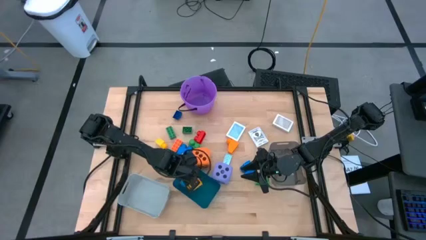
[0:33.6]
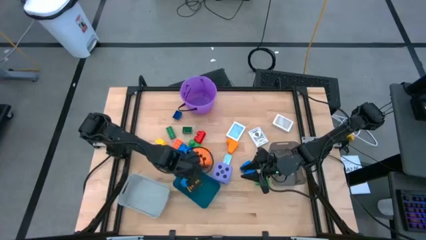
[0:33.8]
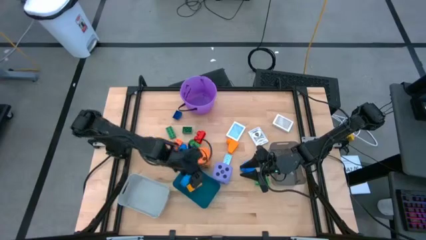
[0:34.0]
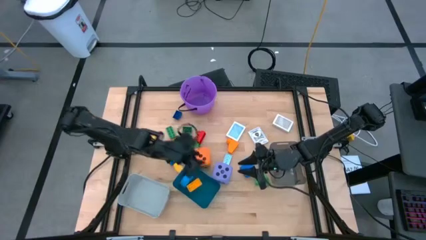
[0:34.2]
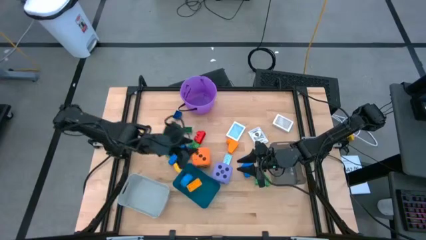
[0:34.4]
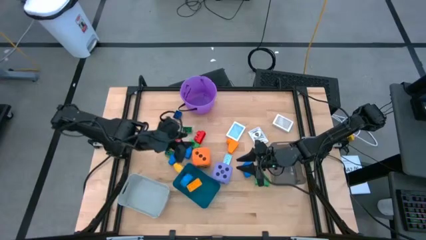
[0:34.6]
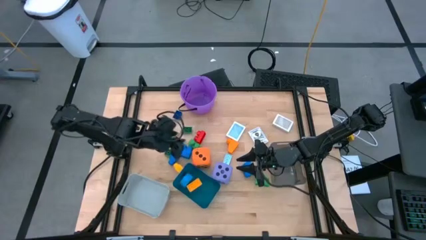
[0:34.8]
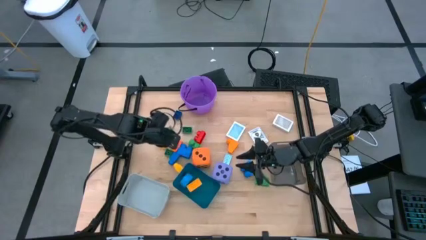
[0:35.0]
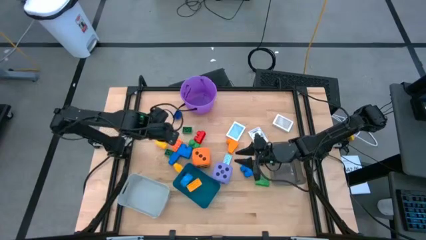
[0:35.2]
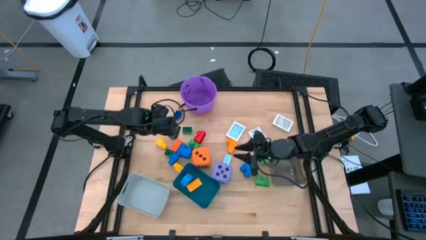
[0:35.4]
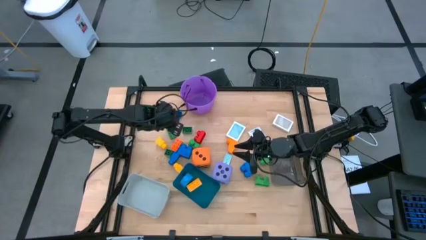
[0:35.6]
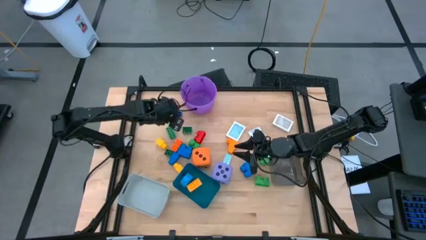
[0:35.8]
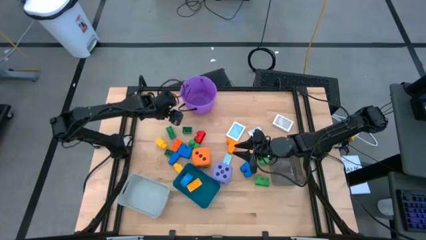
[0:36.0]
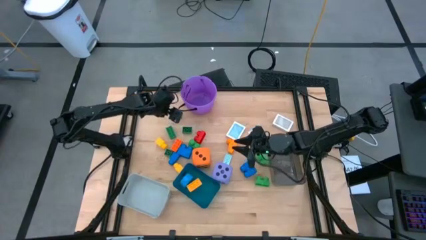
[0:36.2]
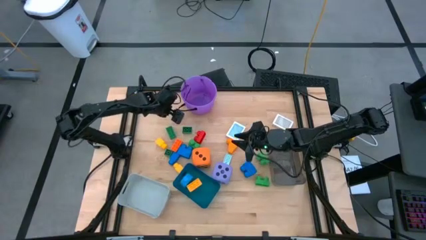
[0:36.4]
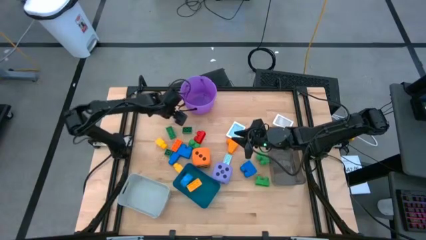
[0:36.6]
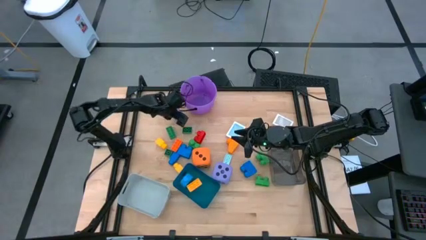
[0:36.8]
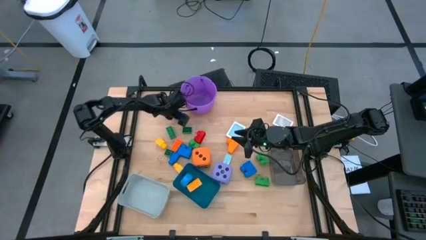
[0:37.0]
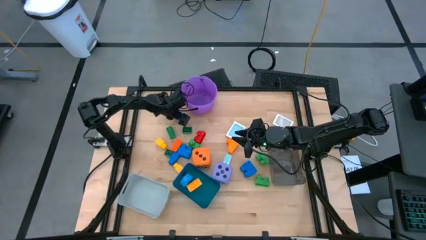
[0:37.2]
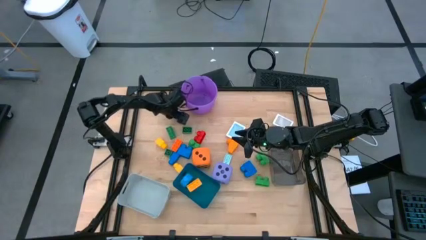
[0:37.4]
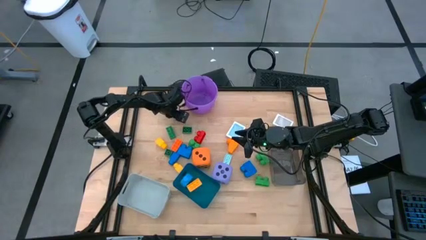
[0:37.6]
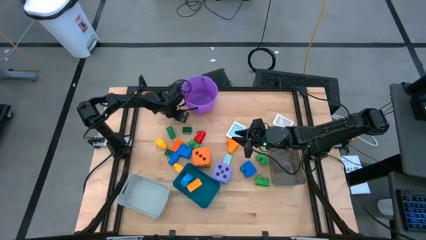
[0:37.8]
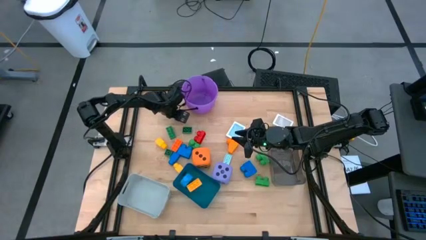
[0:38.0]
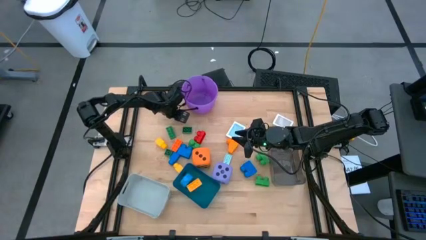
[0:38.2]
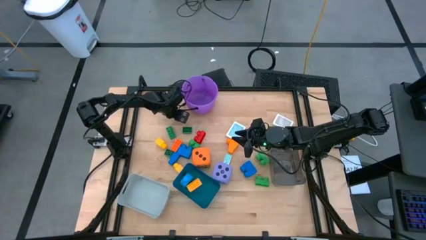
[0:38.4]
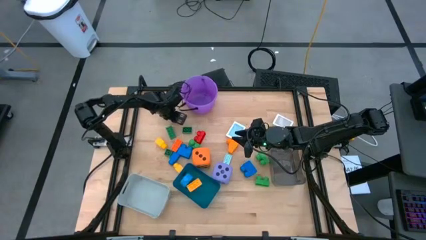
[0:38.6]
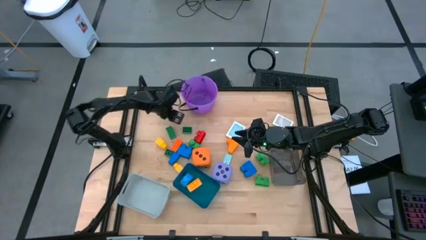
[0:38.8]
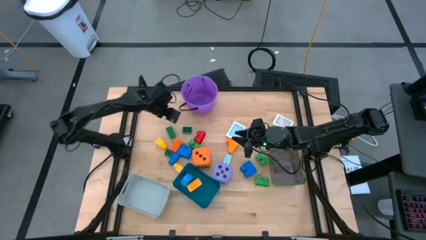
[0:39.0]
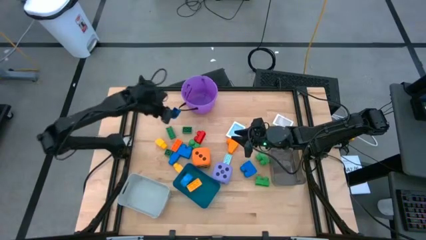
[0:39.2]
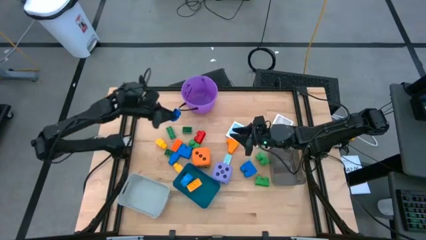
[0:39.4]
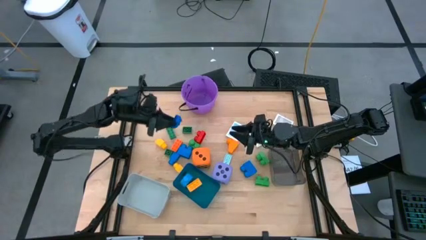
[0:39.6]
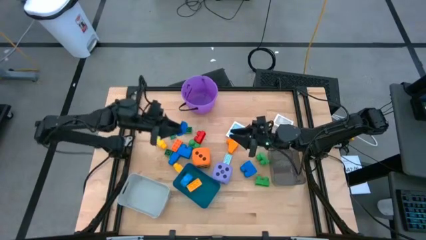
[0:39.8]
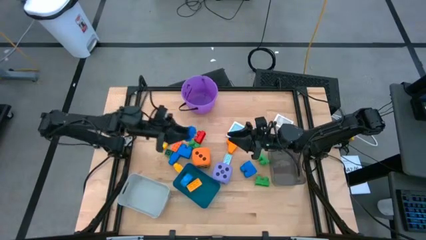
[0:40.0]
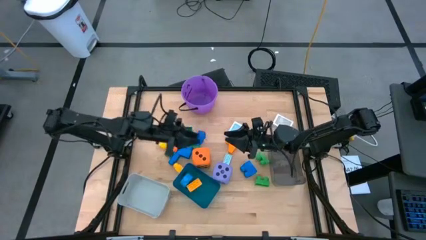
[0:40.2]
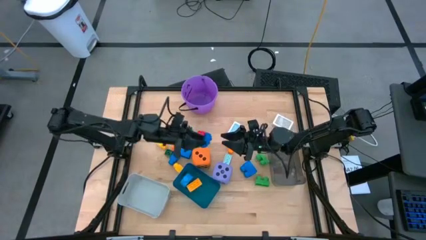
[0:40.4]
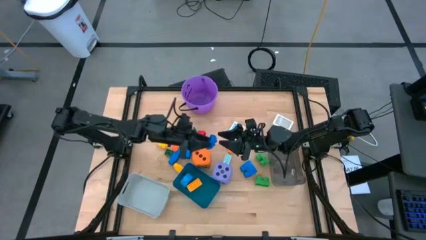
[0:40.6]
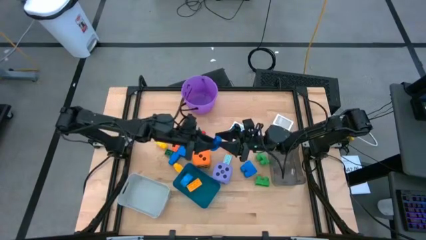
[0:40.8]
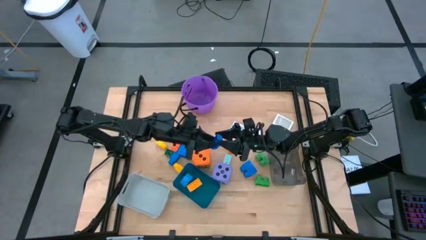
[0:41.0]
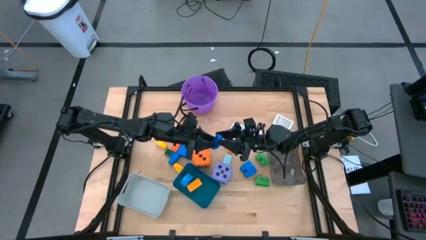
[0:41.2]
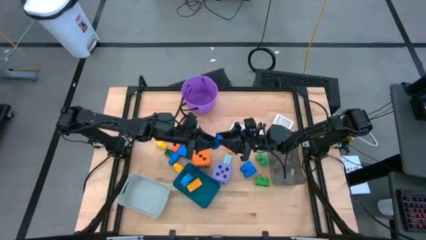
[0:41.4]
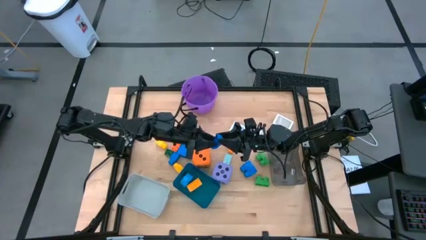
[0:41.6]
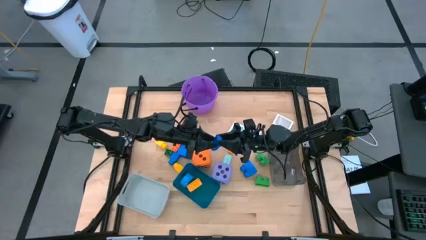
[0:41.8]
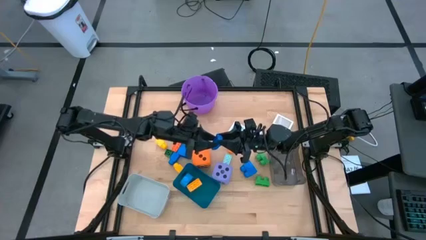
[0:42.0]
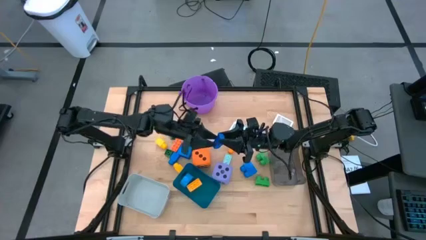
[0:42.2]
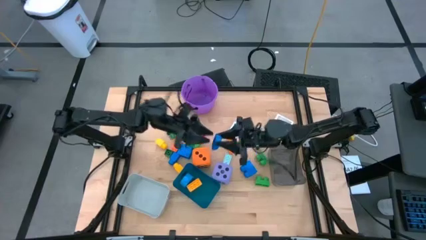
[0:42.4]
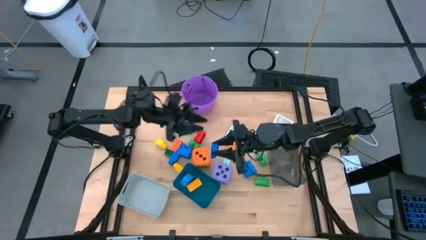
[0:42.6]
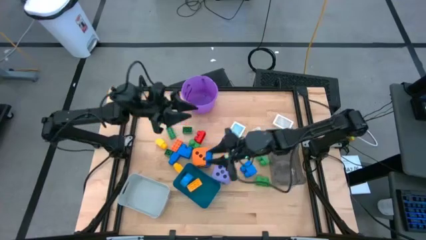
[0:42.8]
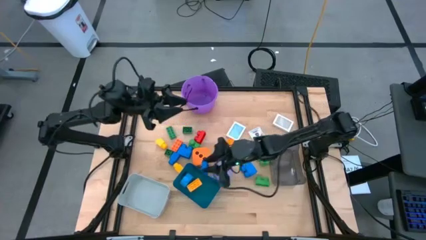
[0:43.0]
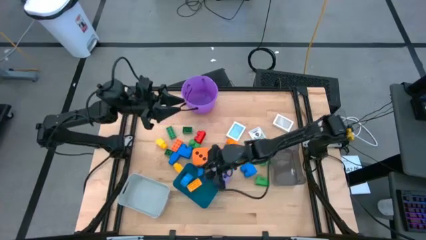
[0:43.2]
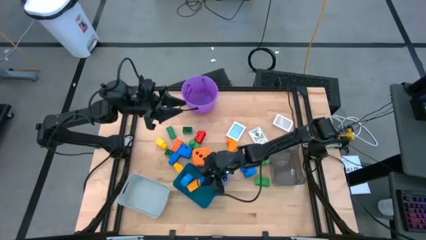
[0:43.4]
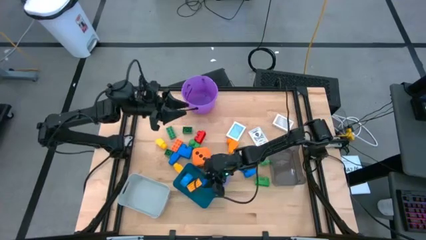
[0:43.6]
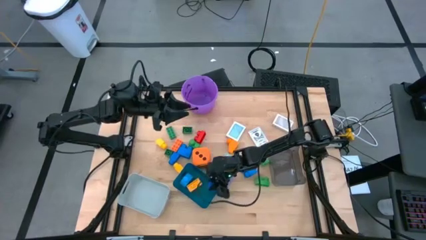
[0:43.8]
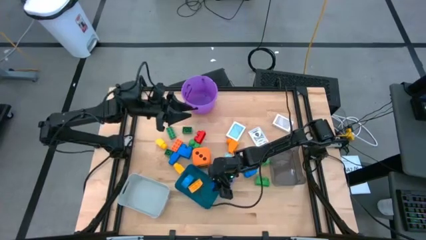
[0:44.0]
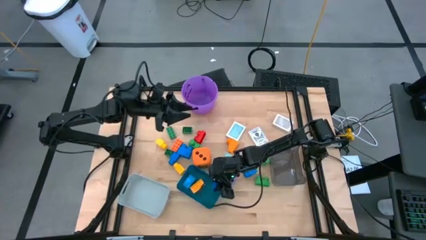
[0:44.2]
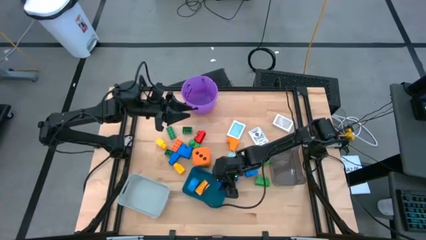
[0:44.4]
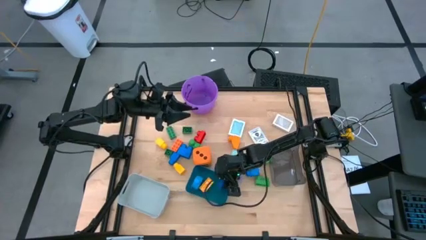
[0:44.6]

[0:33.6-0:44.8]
Task: Pick & Place Toys
Put the dark blue game piece into the blue bin
